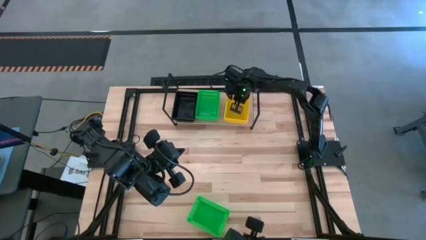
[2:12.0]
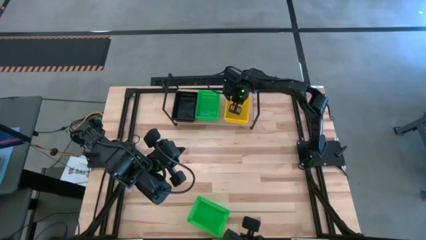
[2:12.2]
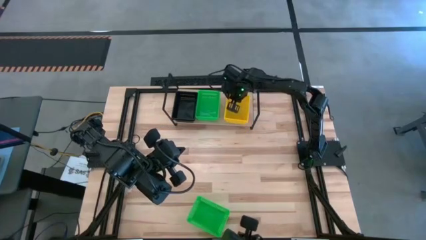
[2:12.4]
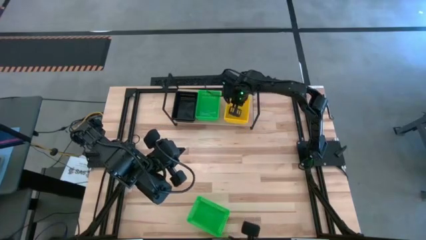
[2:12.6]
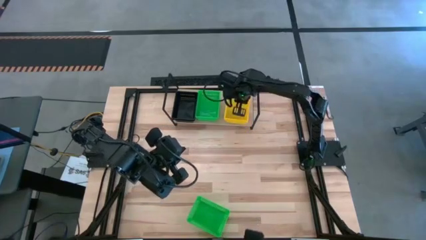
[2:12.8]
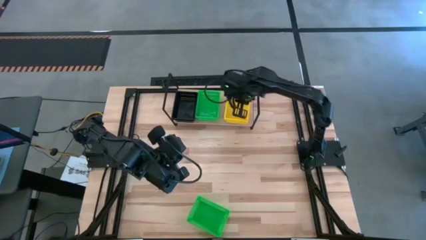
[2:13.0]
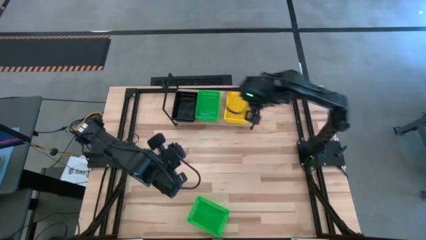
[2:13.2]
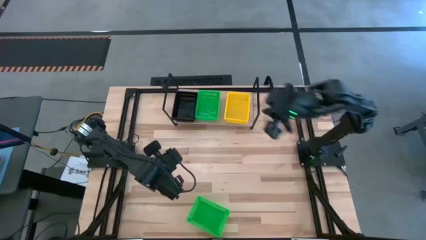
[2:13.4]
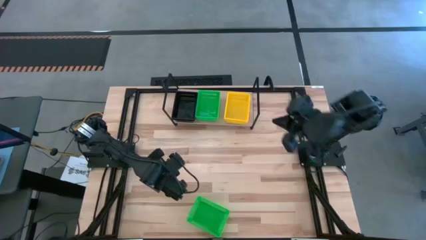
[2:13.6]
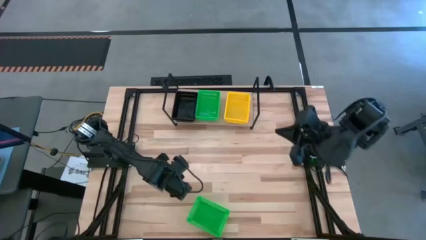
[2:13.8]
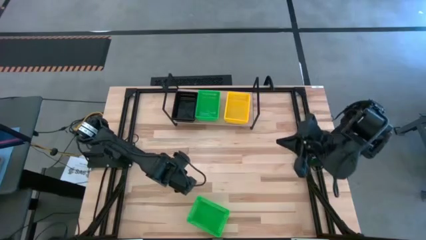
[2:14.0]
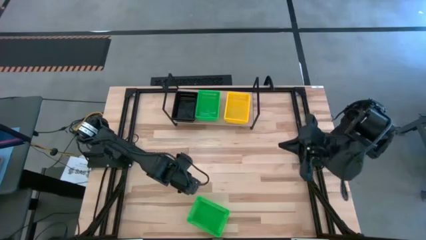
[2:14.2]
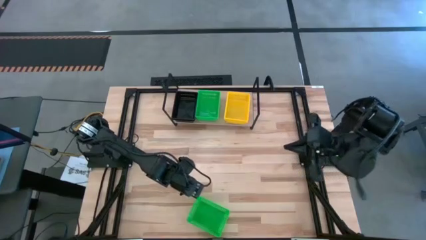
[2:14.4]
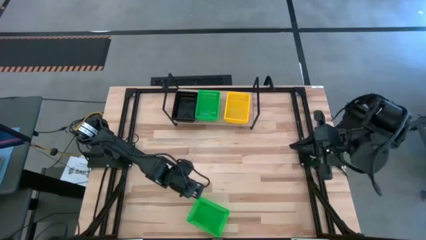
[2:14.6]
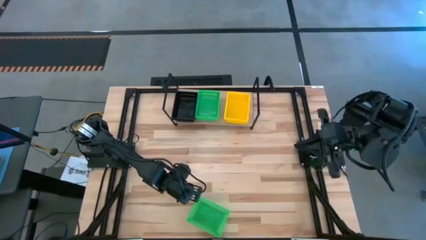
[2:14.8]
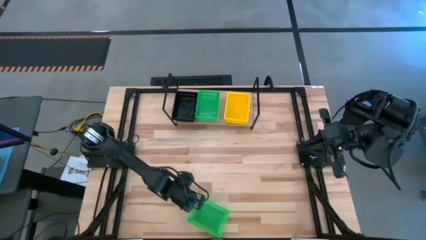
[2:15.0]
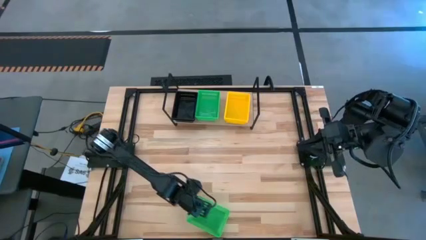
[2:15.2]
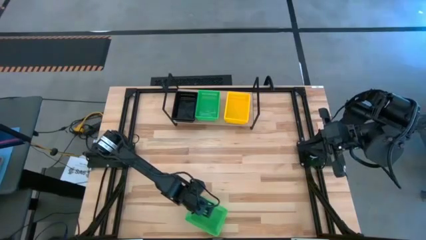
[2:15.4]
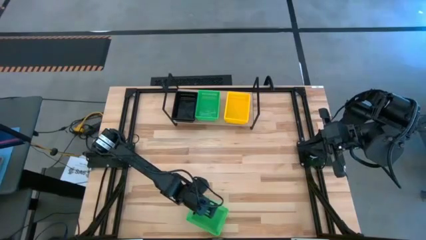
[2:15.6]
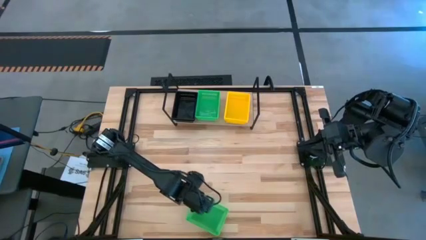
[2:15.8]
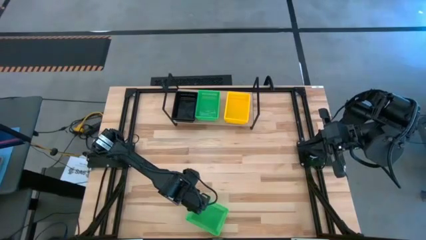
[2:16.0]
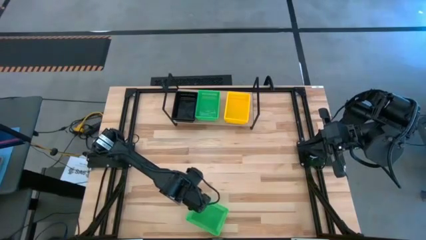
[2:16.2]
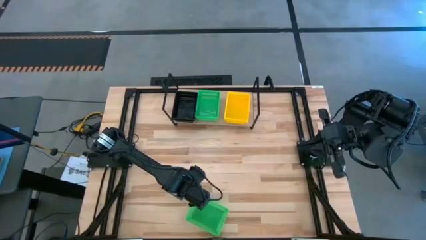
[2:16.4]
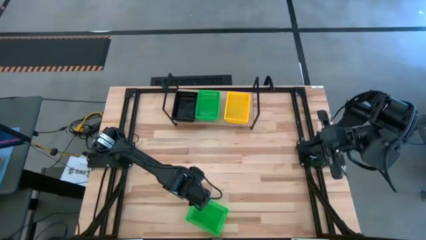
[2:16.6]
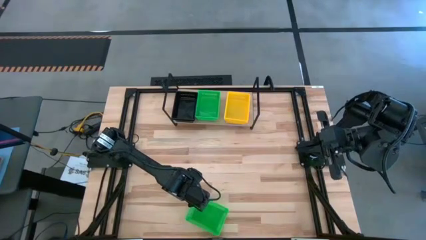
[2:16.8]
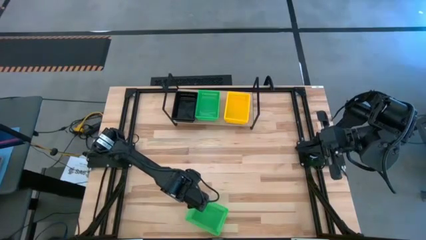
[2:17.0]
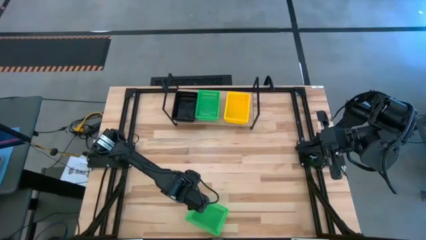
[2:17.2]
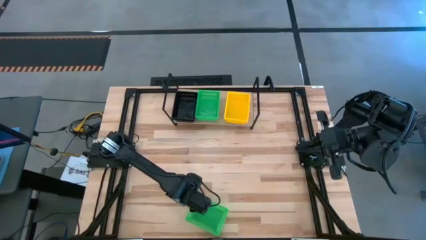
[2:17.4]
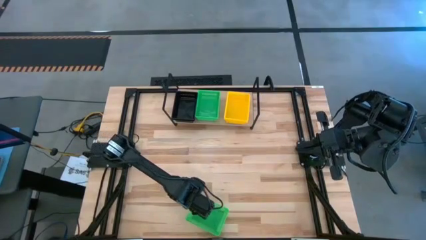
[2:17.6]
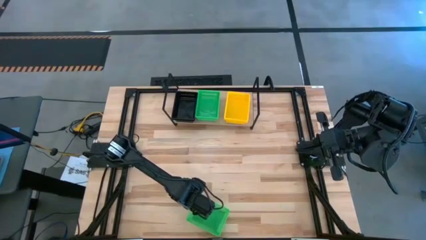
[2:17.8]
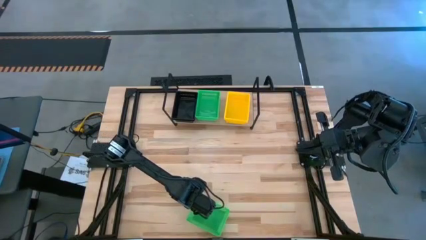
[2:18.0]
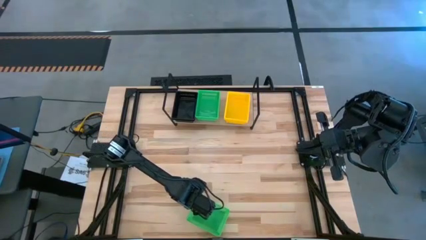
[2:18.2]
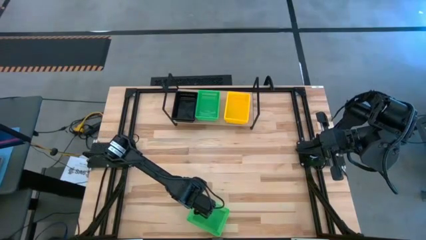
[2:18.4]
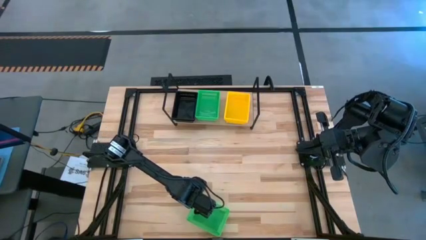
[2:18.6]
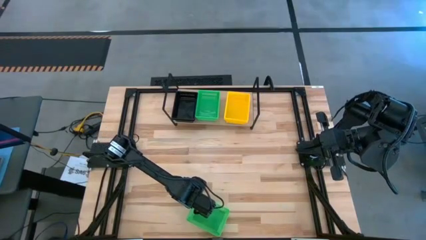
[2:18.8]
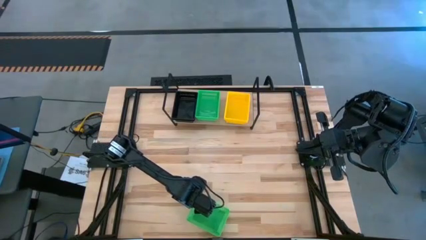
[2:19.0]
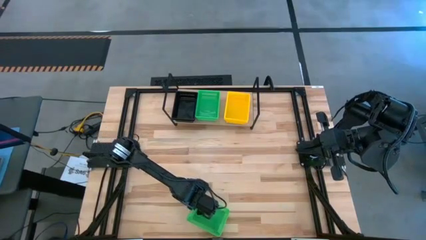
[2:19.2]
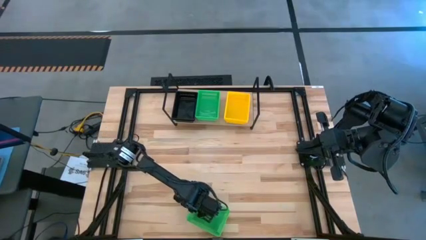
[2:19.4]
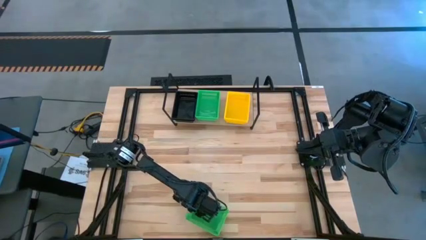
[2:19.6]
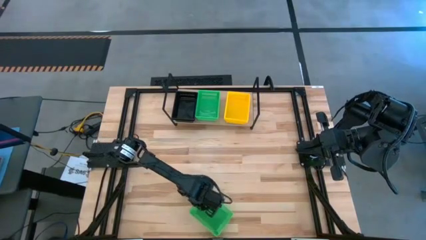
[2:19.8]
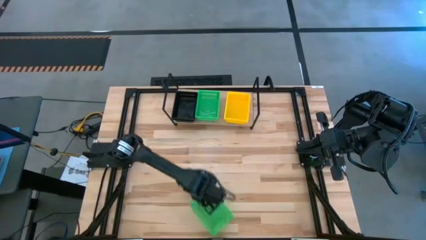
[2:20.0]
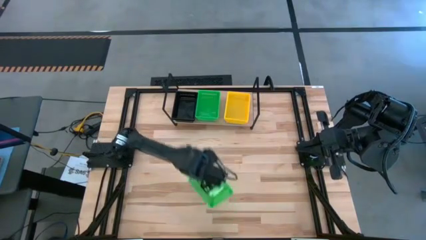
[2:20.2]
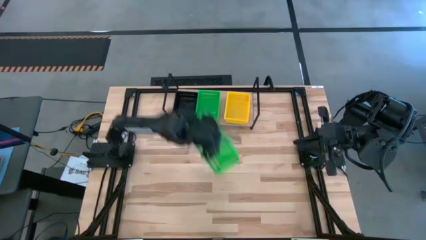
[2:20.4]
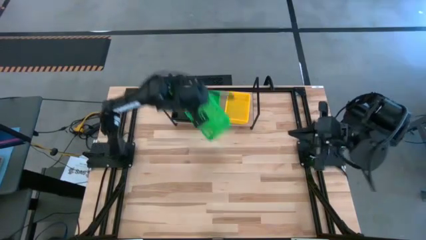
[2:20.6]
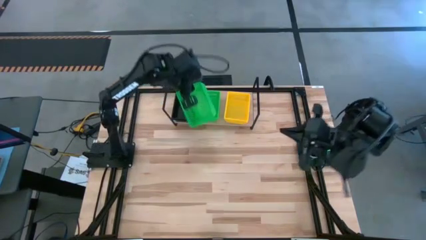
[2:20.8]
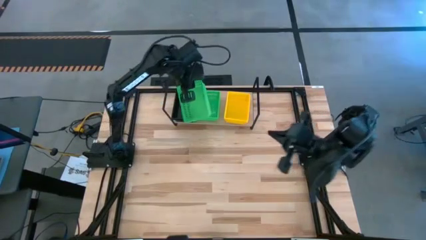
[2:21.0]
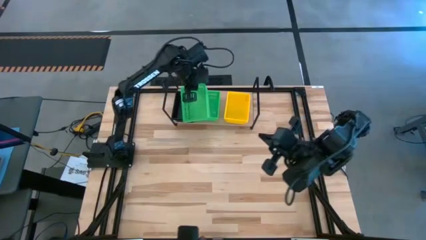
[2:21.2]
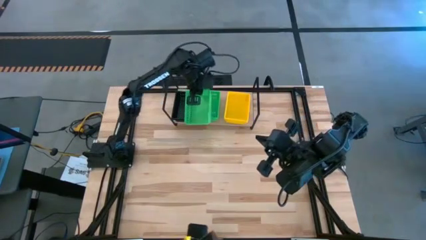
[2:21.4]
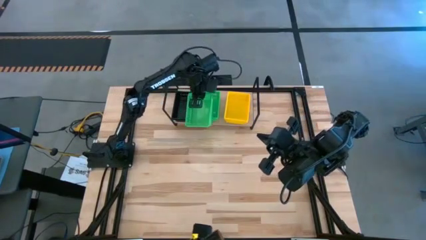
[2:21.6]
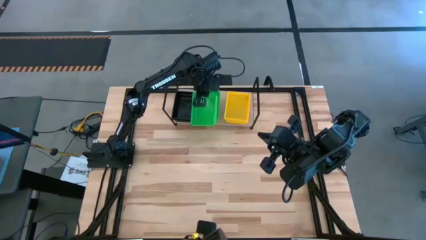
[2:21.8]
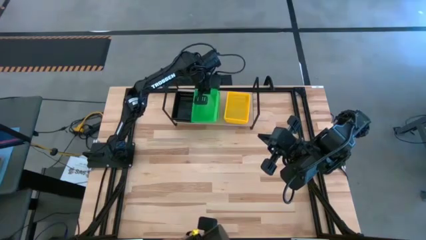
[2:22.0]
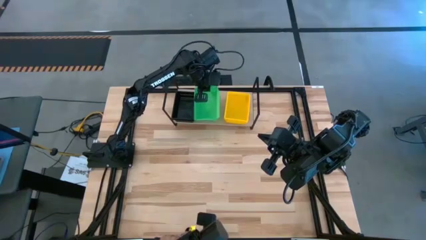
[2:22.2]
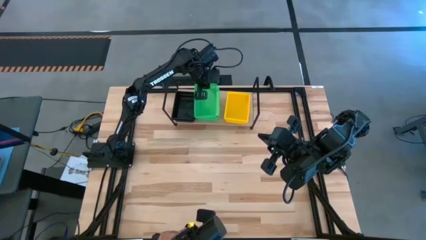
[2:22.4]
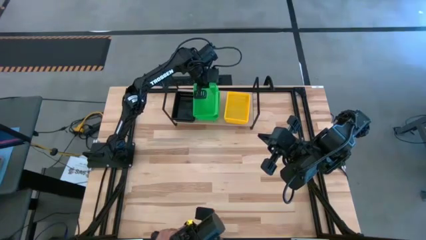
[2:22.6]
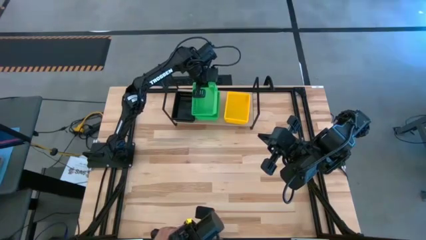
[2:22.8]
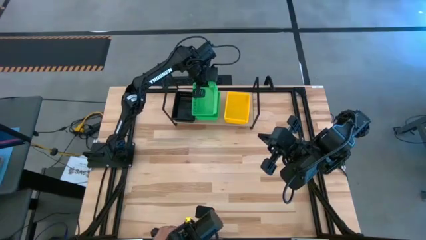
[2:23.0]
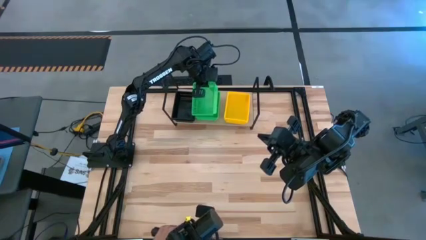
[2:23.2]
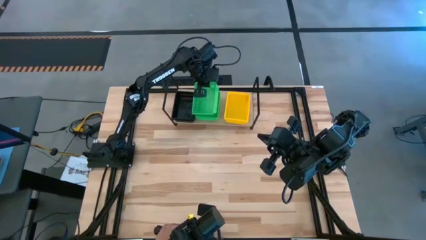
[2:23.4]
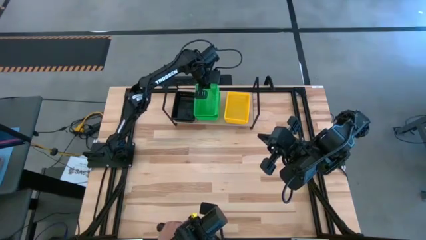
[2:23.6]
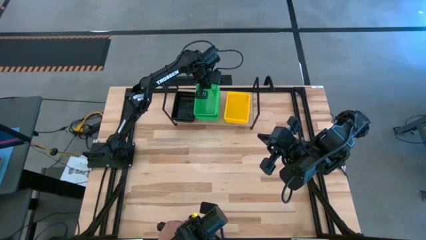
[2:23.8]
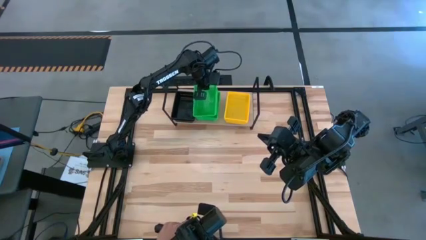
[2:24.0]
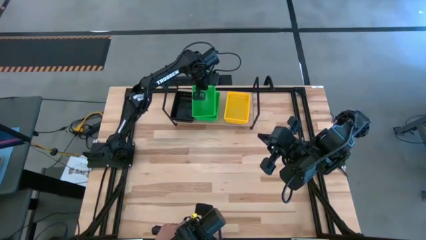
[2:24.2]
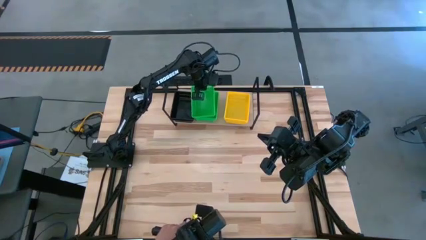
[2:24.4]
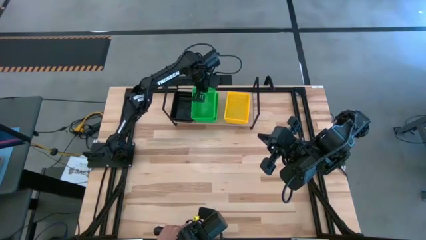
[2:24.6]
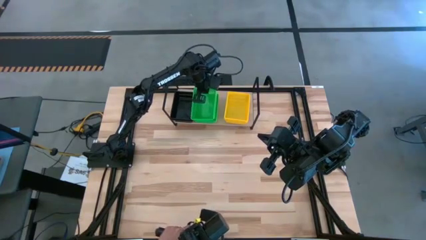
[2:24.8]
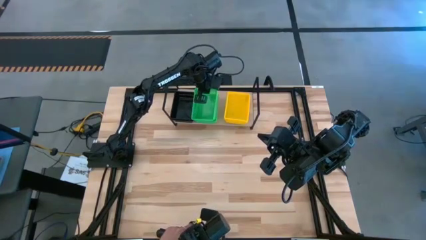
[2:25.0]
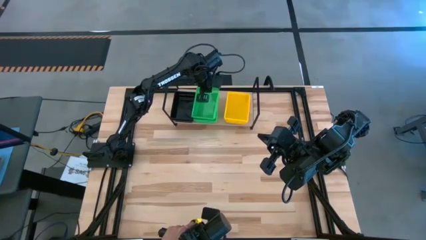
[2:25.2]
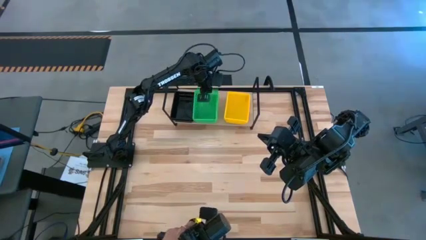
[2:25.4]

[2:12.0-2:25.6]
Task: Stack baskets on shelf by color
Stack the green bin on top of the green bin

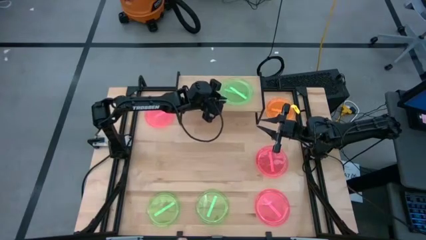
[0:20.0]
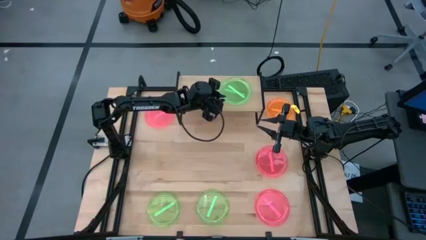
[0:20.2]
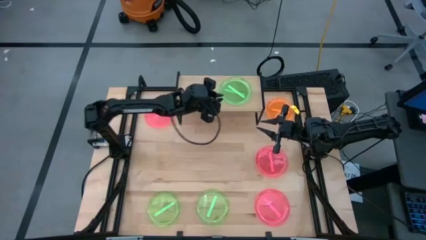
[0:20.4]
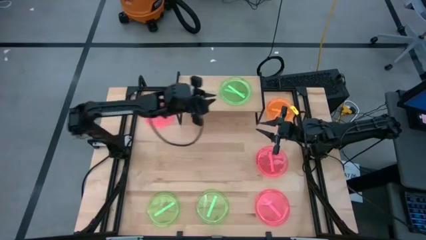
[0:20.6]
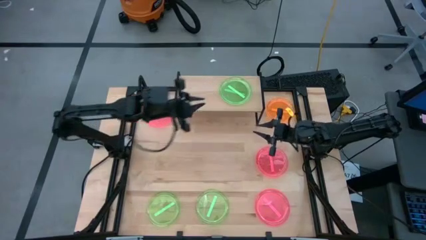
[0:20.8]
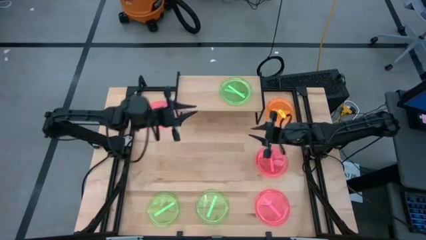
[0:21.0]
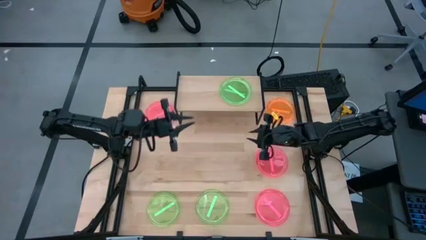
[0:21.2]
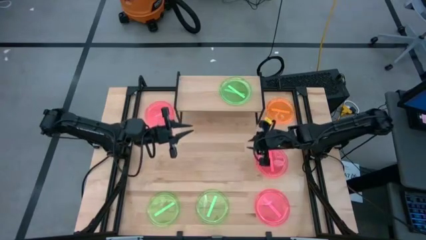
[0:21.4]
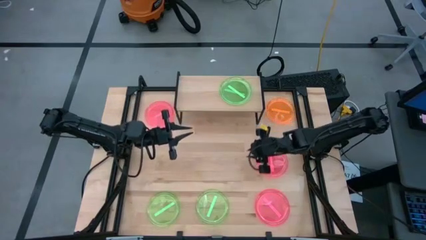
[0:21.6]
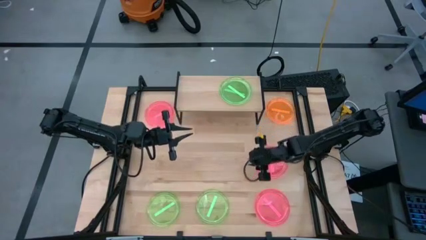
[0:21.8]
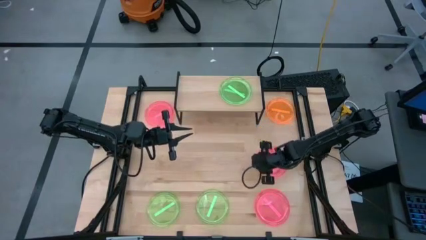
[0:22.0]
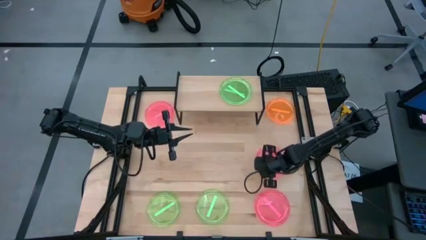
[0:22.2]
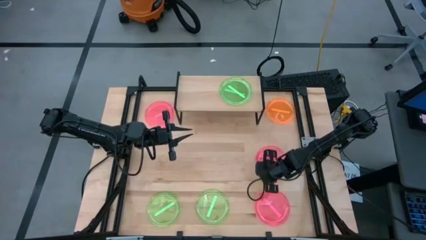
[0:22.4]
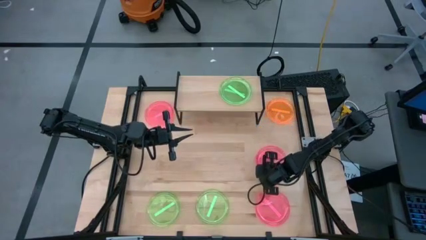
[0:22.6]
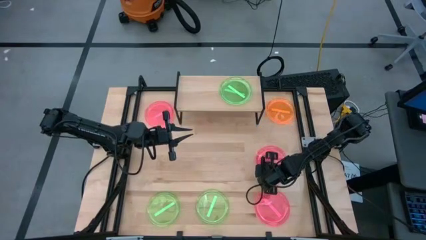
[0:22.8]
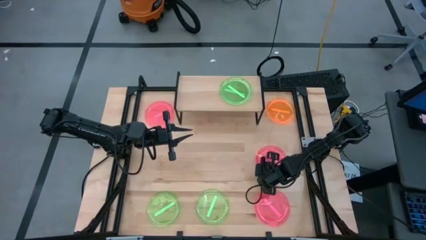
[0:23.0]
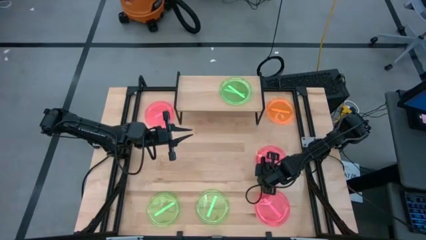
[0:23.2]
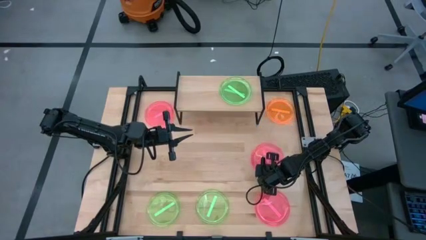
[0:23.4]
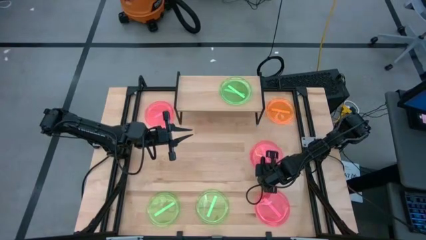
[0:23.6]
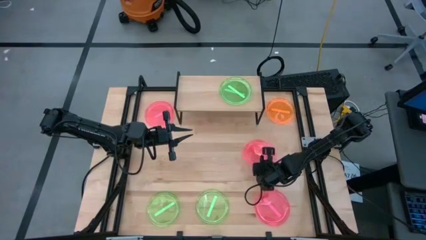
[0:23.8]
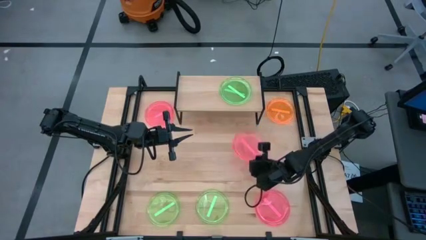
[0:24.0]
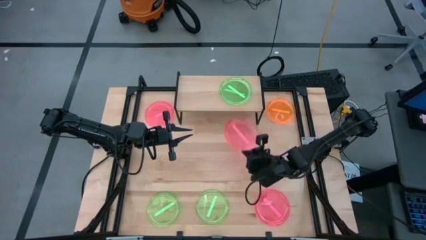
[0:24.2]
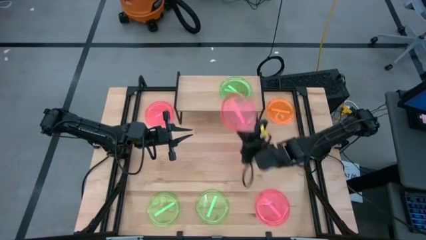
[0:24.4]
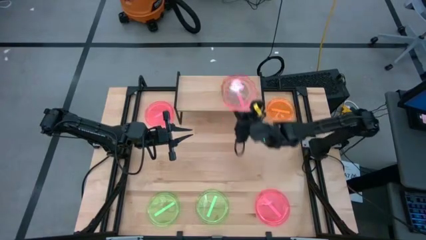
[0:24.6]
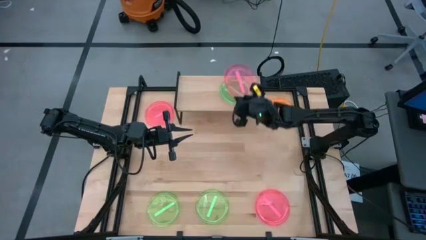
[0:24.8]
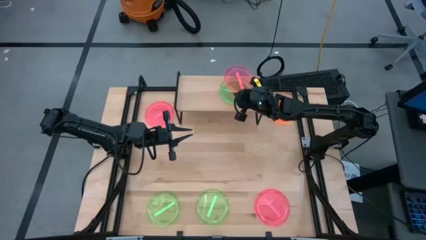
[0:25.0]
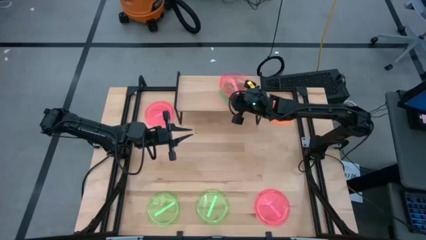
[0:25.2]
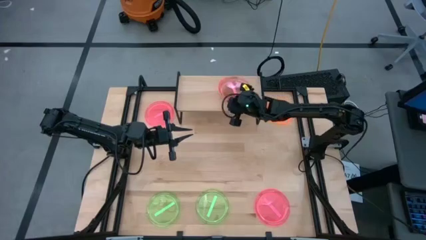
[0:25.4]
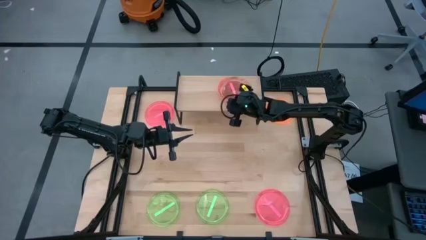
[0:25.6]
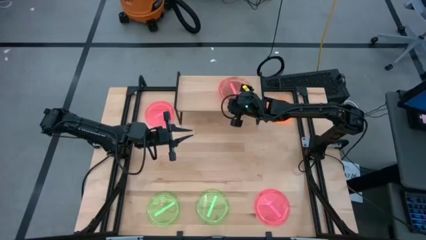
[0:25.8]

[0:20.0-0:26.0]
Task: Place and stack plates onto a shelf
Stack the pink plate on top of the green plate on the shelf
